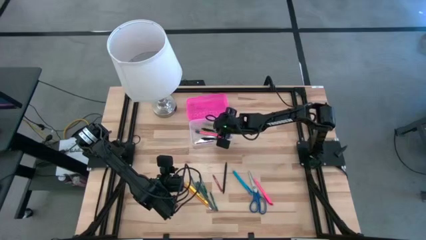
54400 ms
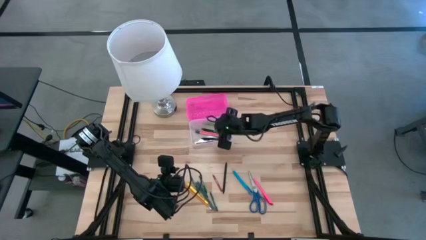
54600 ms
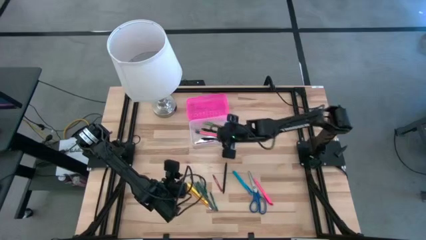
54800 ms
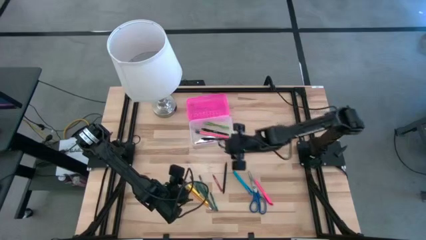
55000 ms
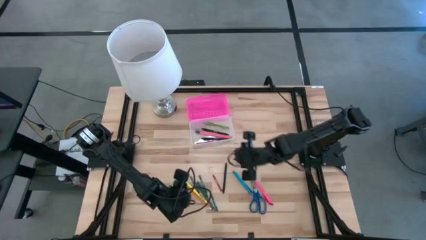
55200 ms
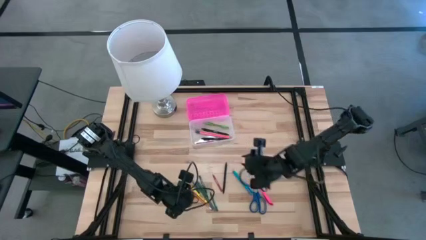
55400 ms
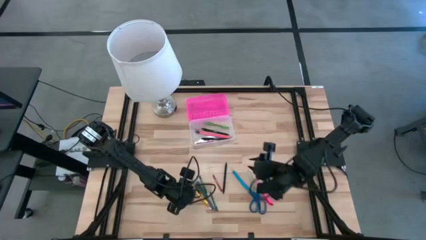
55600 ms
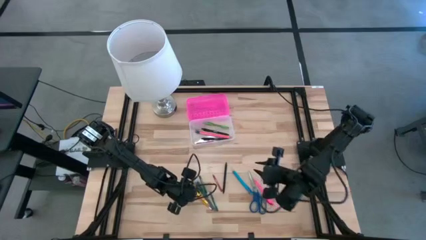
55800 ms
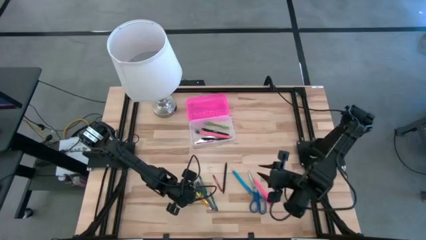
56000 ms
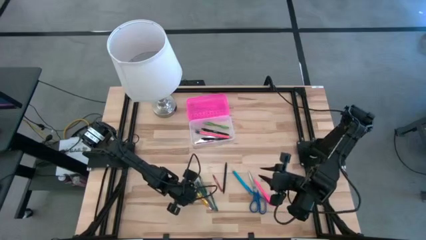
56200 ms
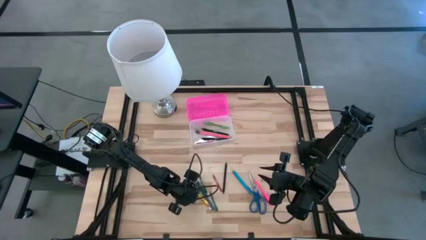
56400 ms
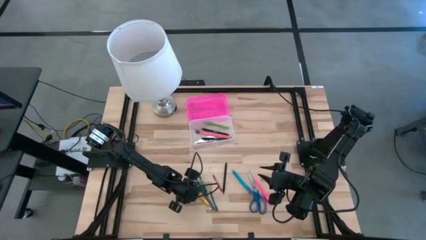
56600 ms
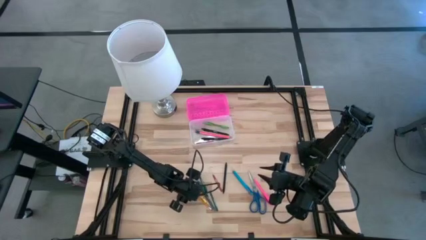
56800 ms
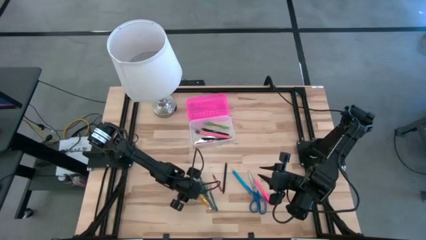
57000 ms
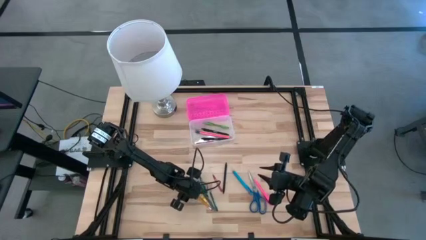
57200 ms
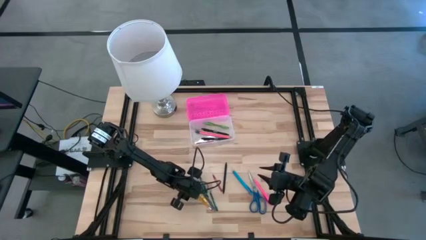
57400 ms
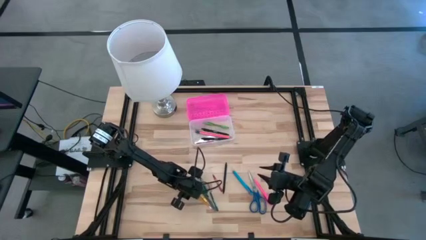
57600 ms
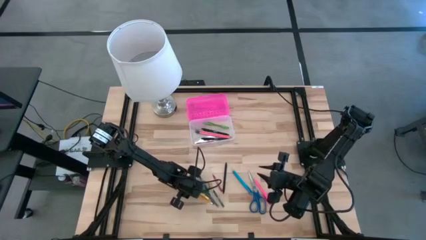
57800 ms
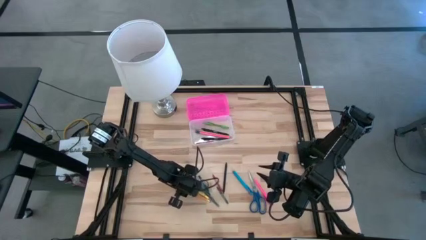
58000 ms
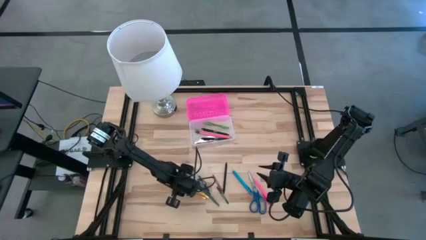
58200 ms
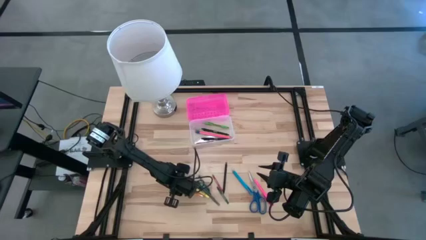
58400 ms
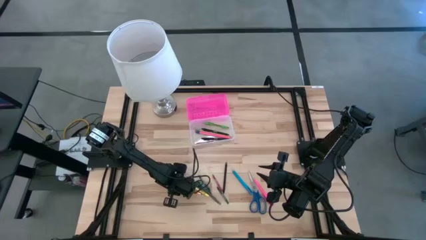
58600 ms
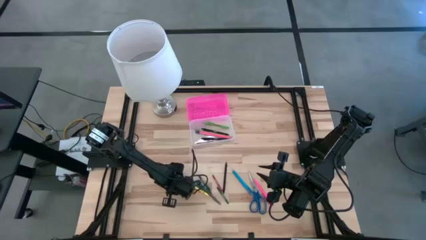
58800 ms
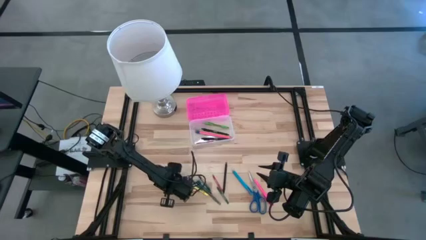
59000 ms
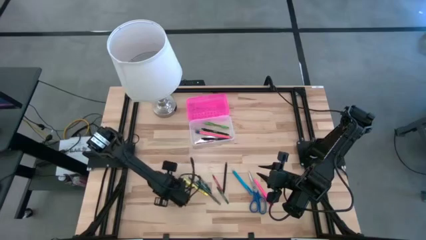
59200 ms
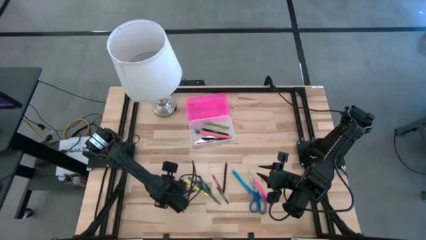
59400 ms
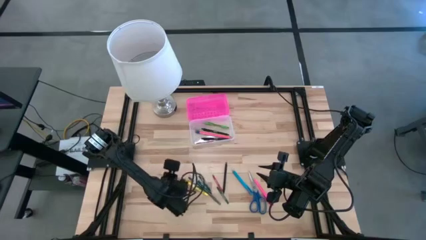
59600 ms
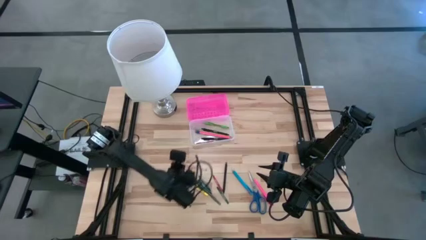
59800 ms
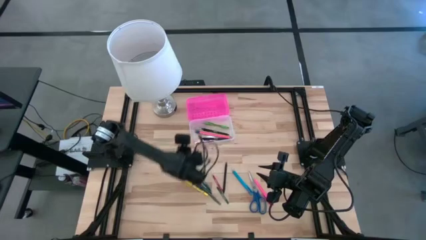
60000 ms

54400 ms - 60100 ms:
Task: Pick & place school supplies into a supply box
Put the orange pencil into the pink supply box

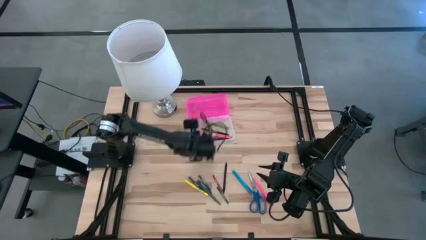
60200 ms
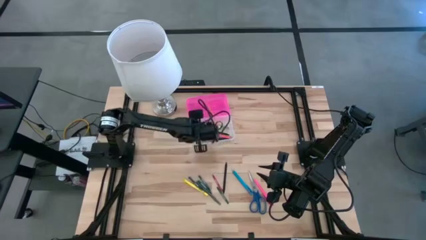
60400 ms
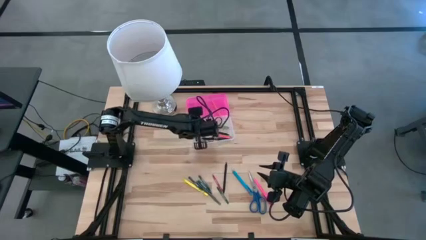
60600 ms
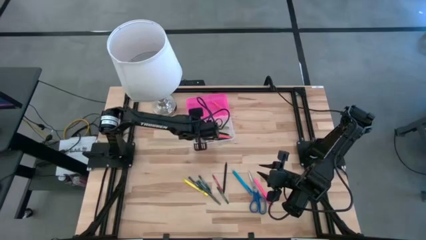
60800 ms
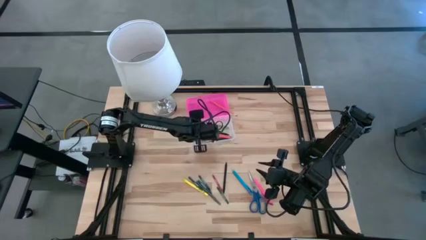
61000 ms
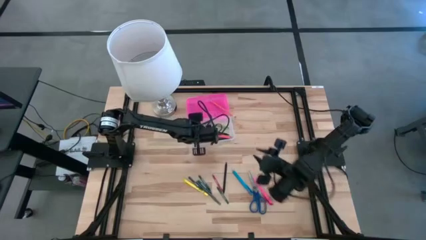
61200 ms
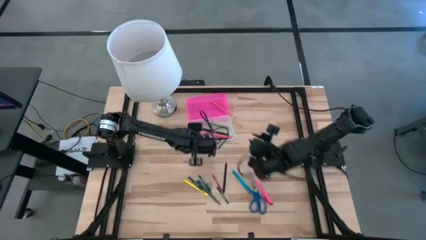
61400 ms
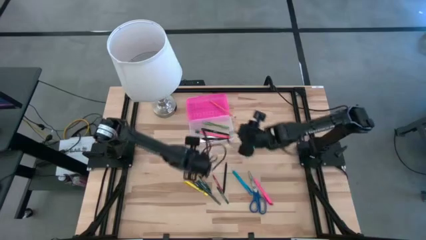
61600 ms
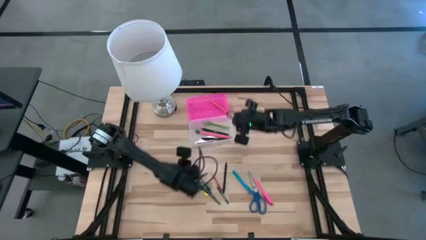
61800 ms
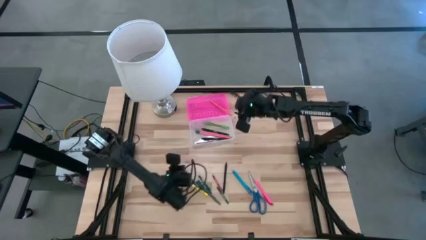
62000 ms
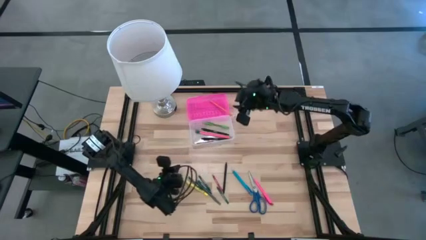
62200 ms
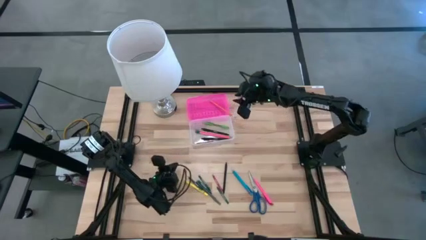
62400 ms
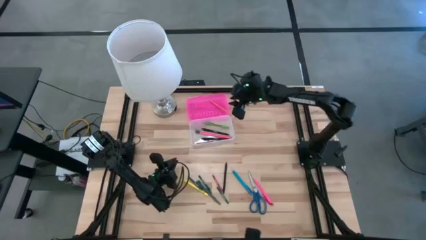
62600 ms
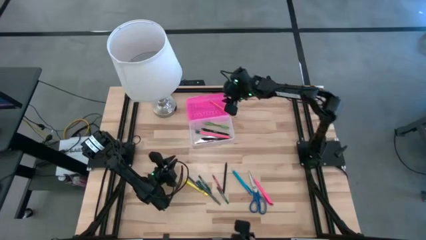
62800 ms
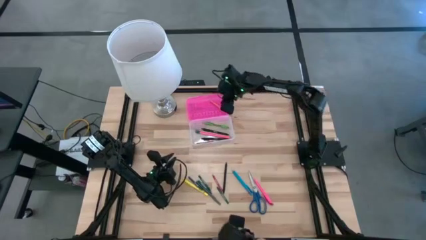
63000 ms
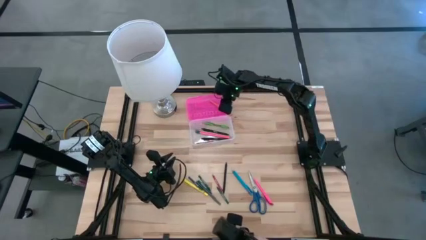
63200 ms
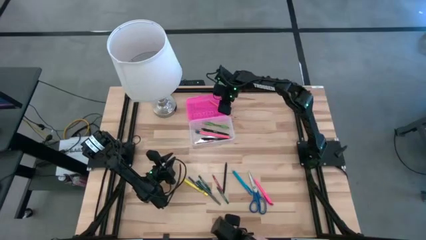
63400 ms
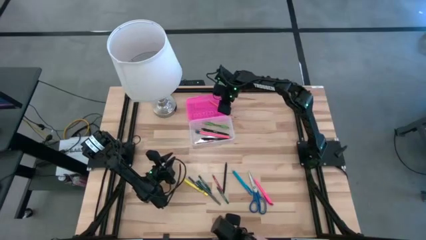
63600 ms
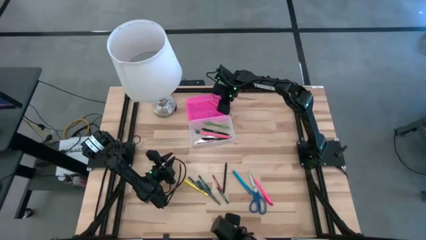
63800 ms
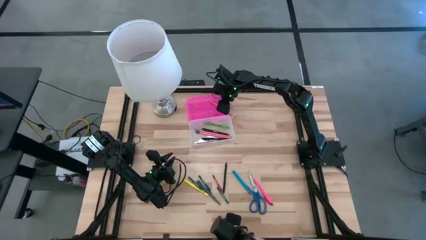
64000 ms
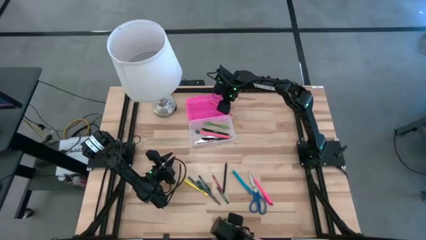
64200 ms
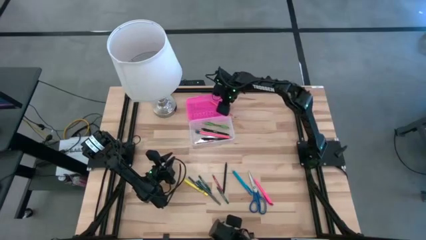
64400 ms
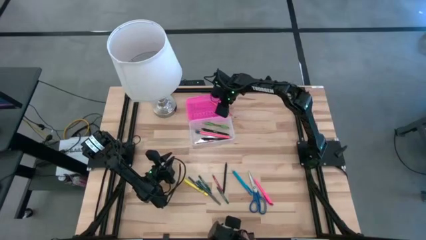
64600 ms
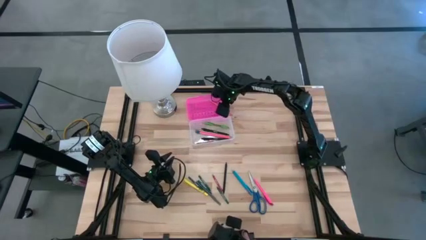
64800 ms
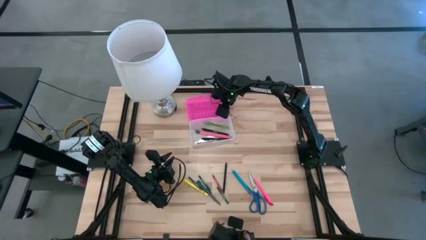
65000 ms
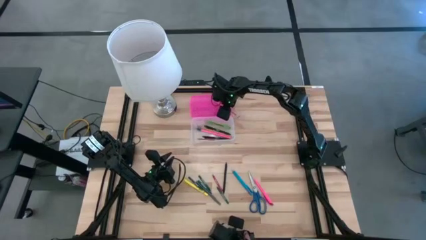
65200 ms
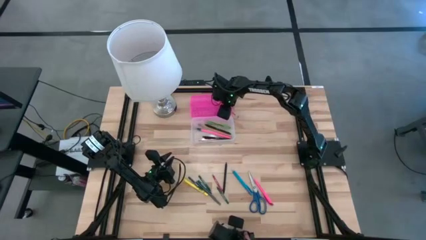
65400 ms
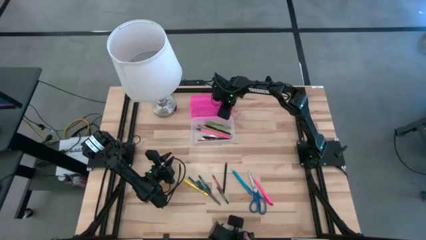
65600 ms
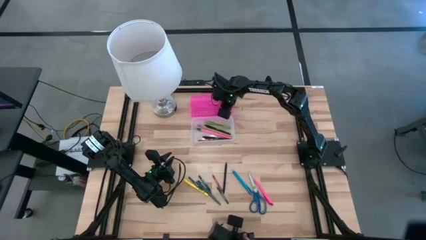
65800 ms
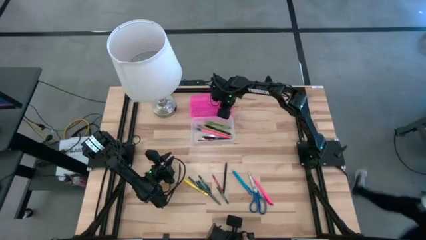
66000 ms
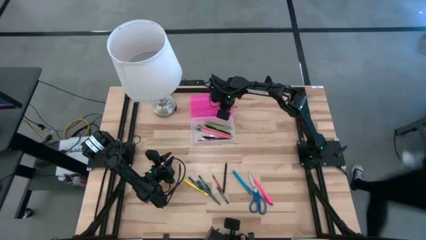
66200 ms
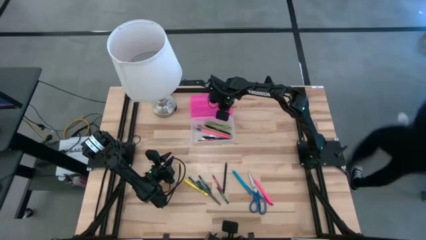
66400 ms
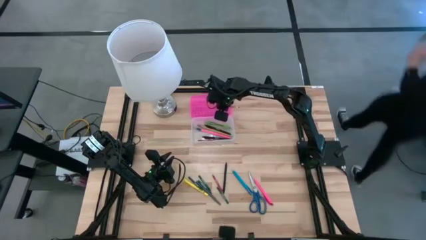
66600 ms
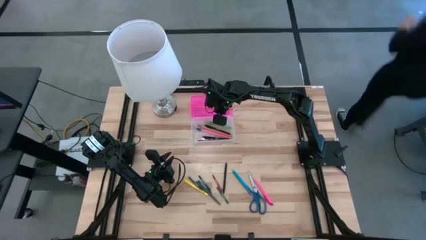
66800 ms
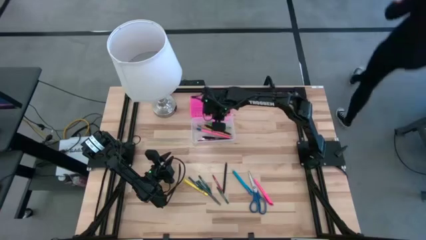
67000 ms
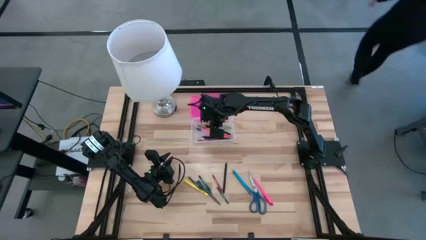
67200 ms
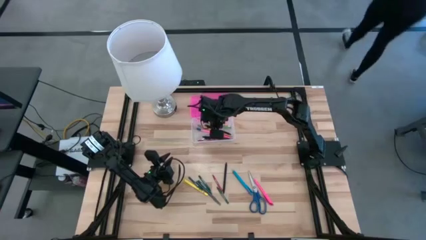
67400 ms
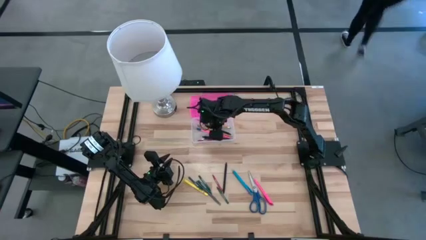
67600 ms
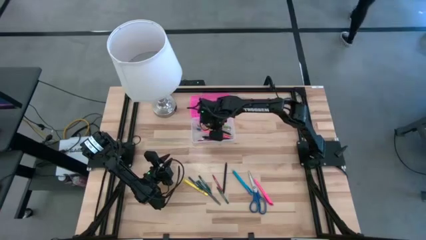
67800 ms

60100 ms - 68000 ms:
Put the orange pencil into the pink supply box

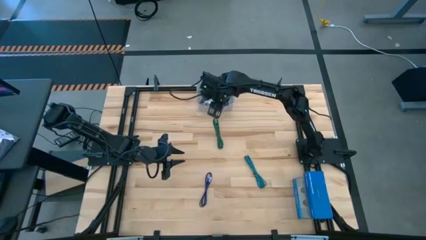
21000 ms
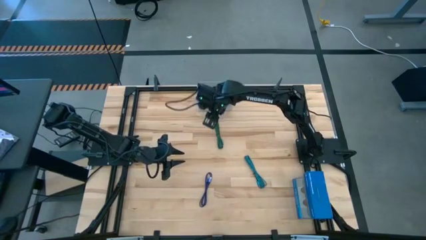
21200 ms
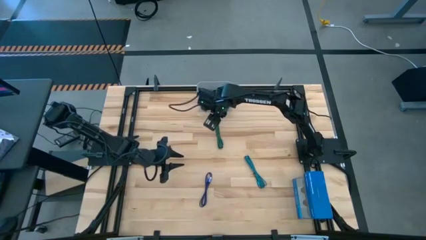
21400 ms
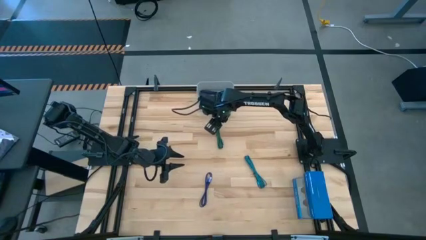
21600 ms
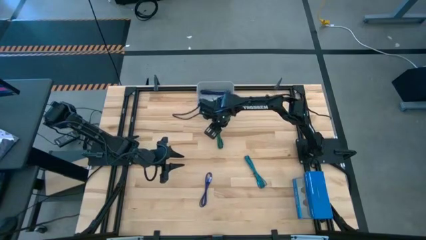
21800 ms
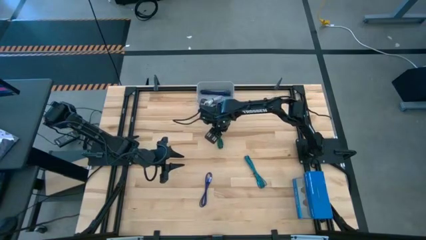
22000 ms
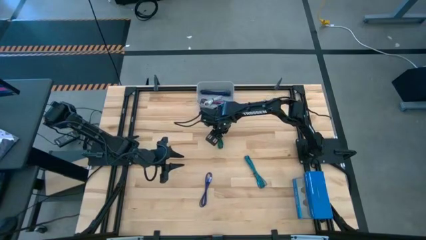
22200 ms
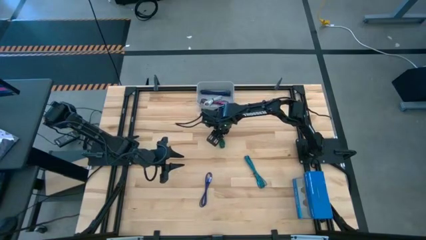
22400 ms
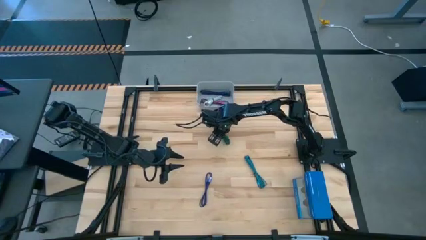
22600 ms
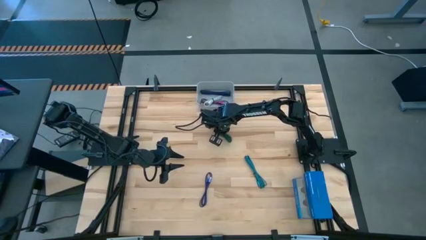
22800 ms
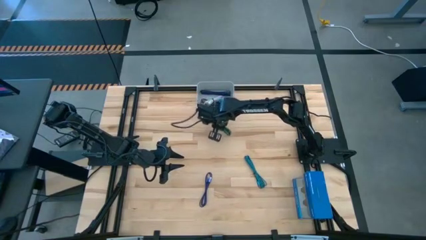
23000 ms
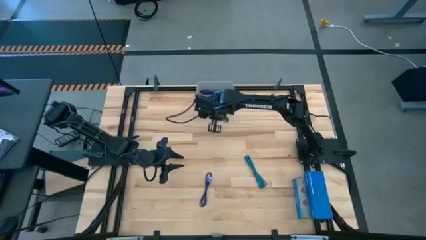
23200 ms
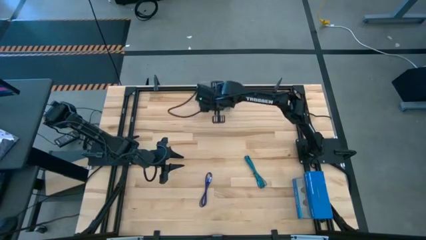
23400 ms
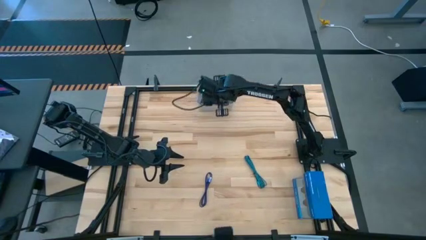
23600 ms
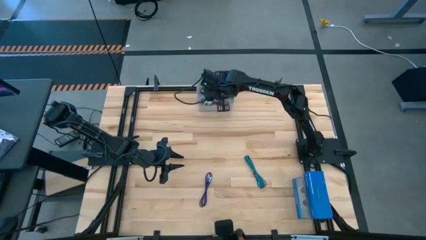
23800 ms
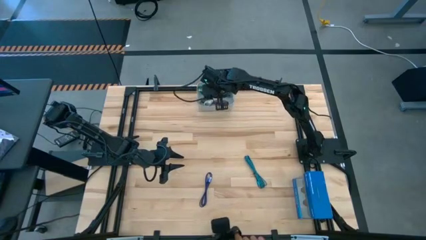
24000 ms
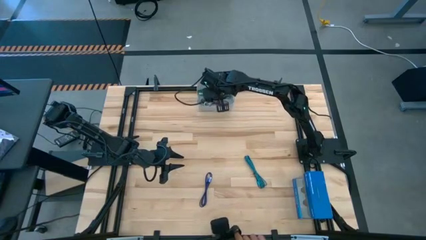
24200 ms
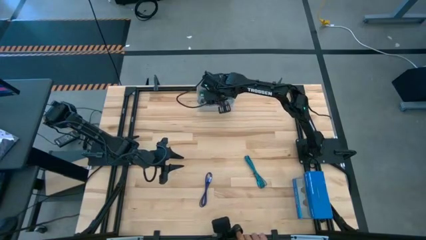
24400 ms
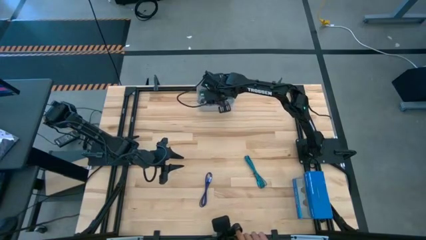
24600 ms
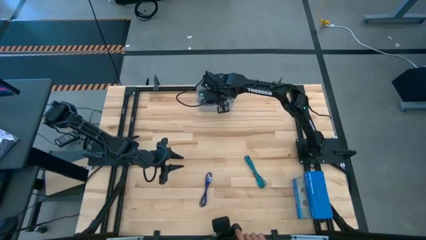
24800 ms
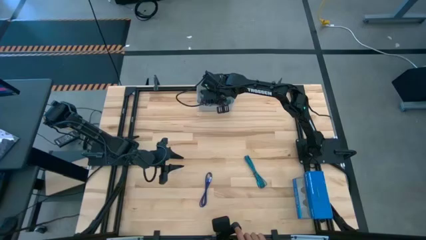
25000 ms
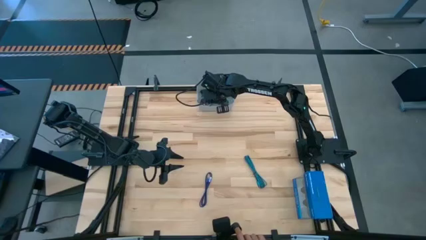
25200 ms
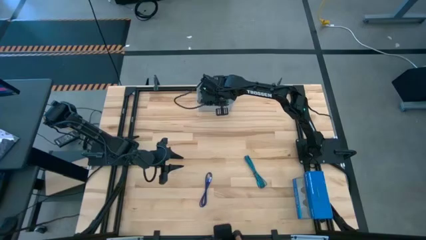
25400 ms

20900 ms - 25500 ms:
Task: Pick and place USB-C Cables
Put the green charger cable into the gray bin
